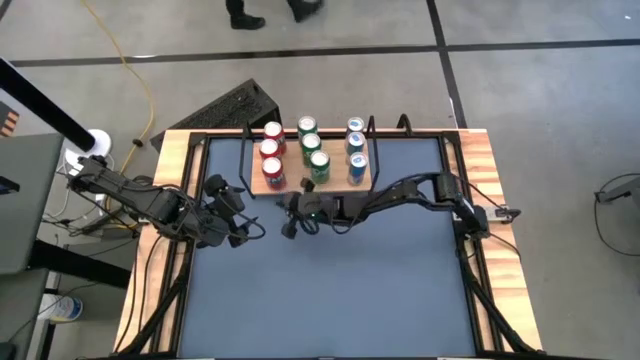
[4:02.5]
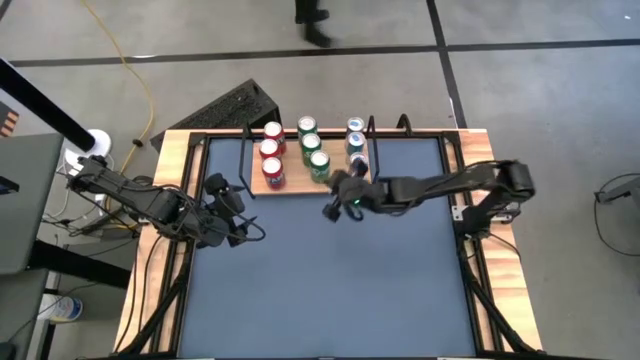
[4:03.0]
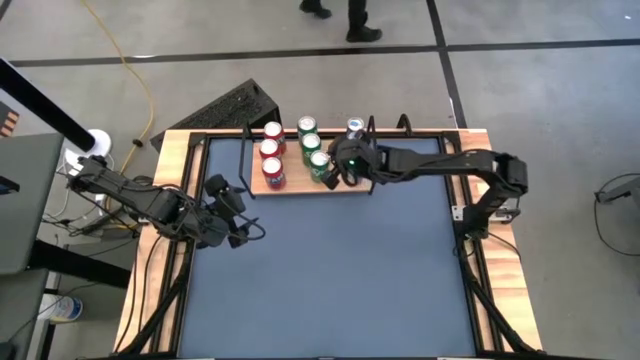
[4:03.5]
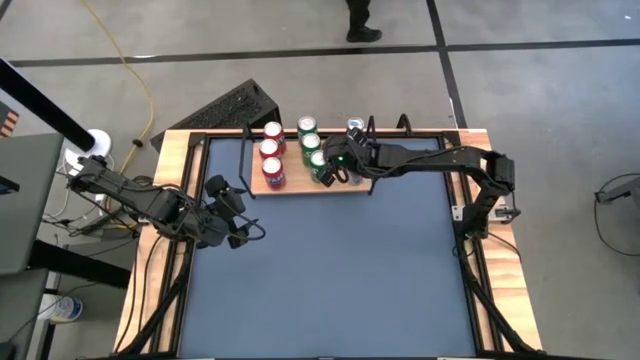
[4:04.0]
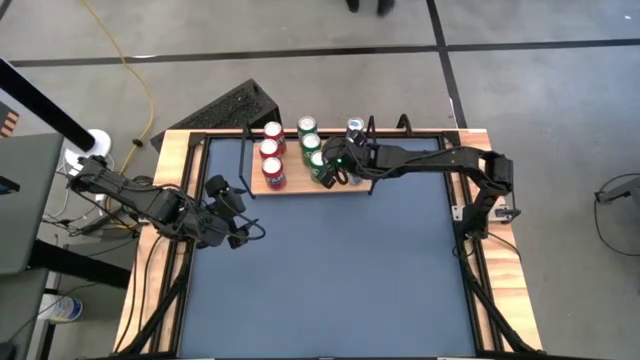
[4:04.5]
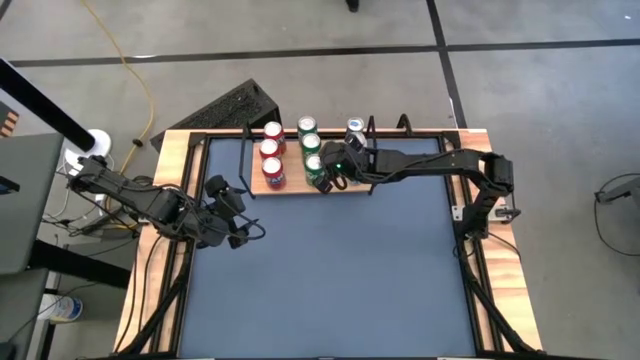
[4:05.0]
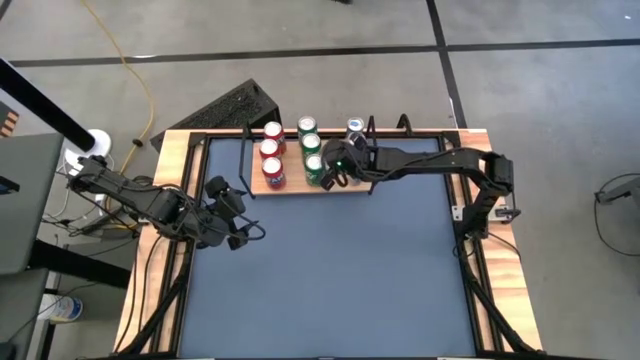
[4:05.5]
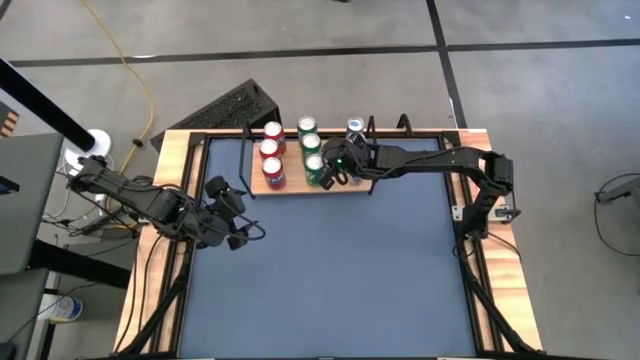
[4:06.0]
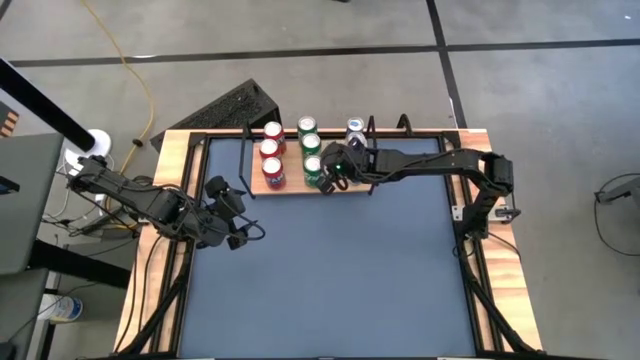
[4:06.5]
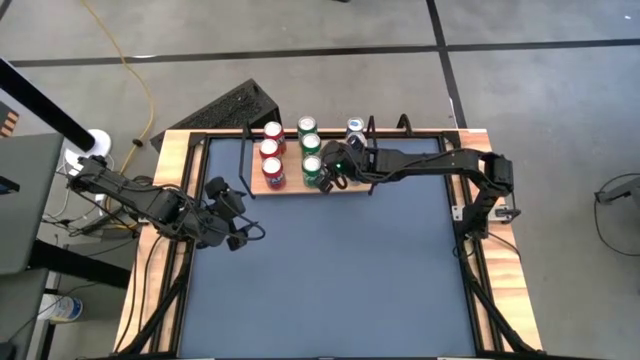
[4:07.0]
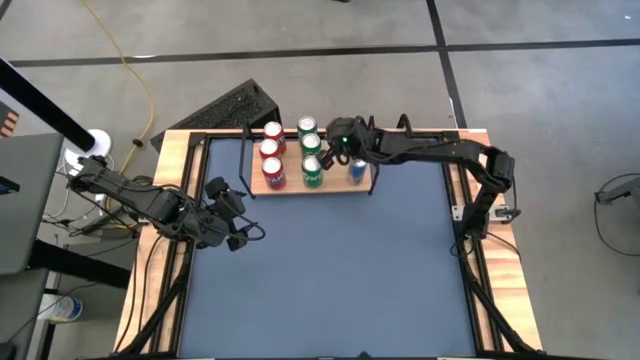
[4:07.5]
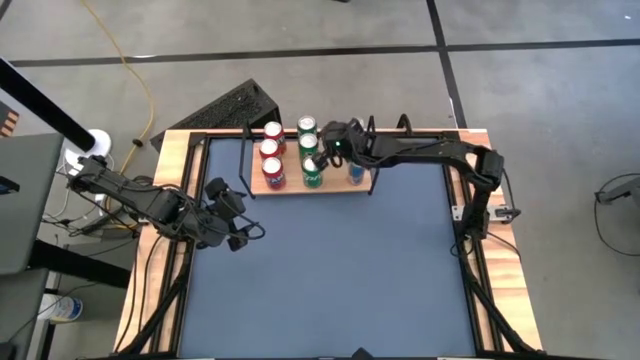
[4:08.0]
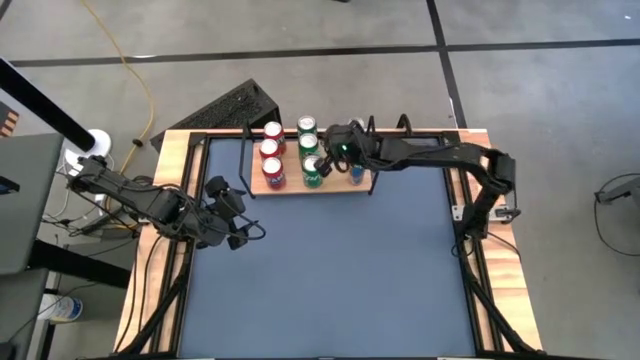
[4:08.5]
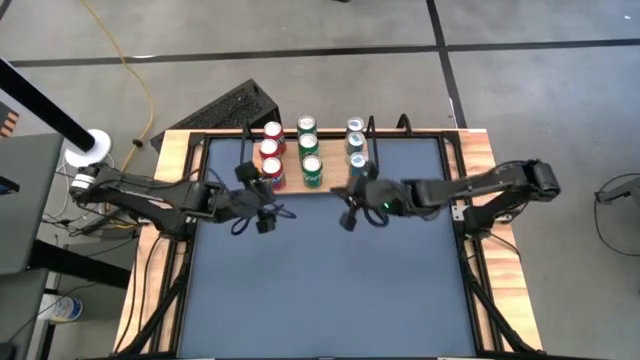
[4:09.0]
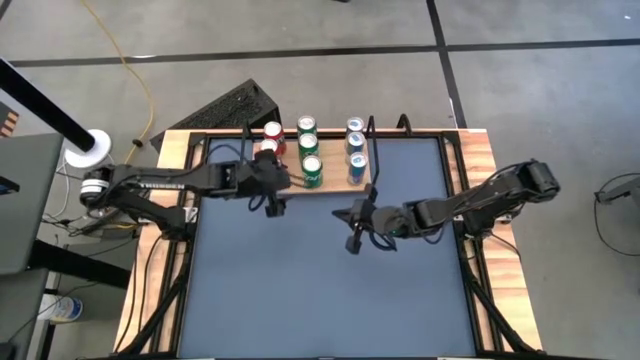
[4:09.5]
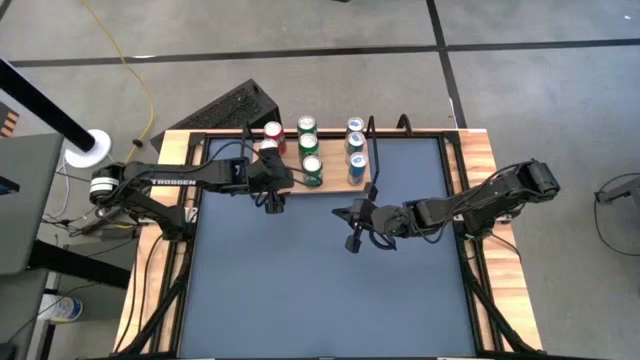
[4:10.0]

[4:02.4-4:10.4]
Task: Place canned beverage on shelf
Adjust the soda cans on the shelf

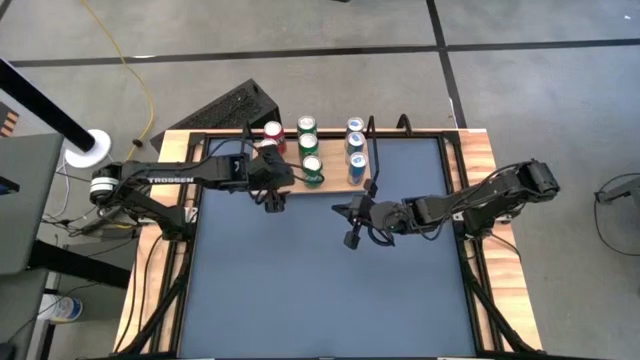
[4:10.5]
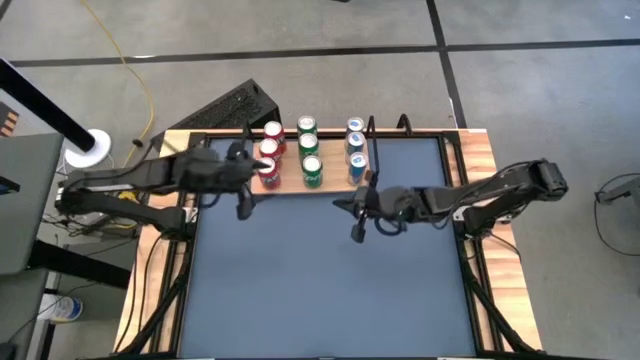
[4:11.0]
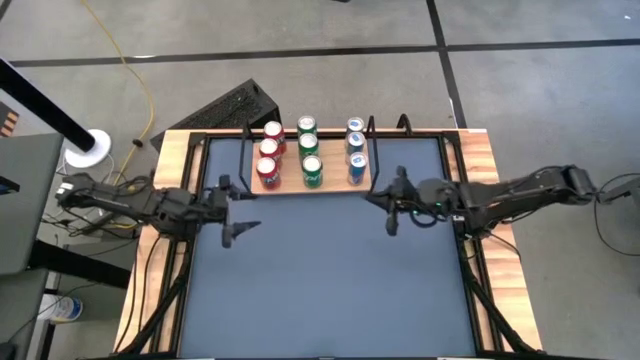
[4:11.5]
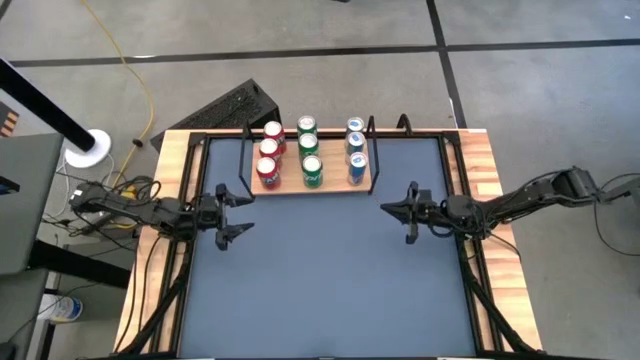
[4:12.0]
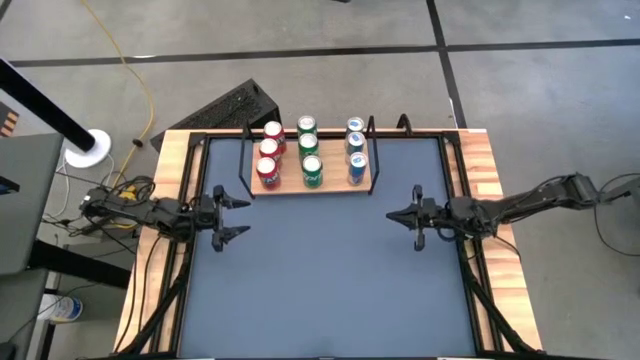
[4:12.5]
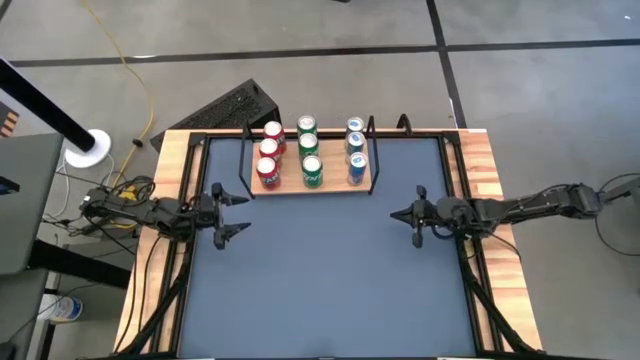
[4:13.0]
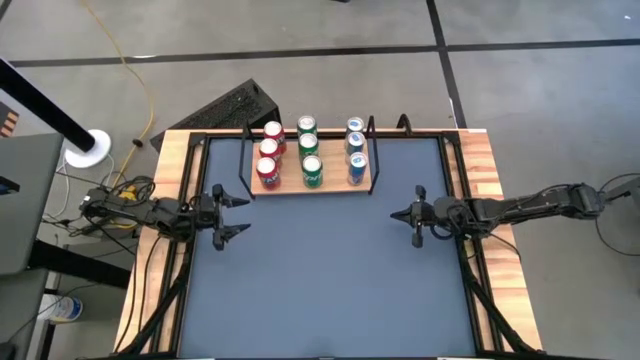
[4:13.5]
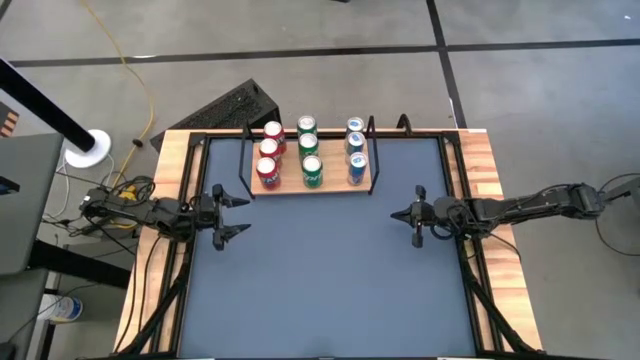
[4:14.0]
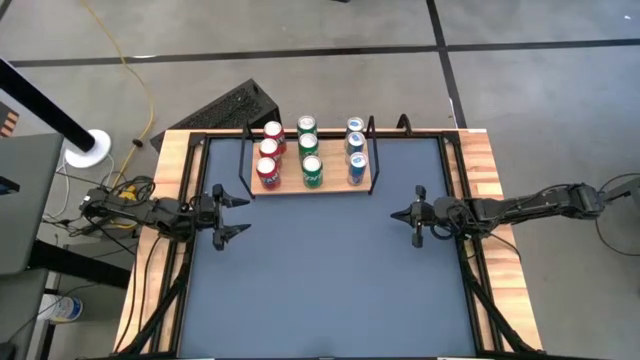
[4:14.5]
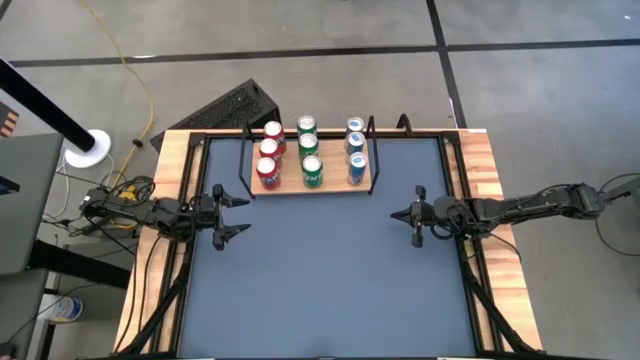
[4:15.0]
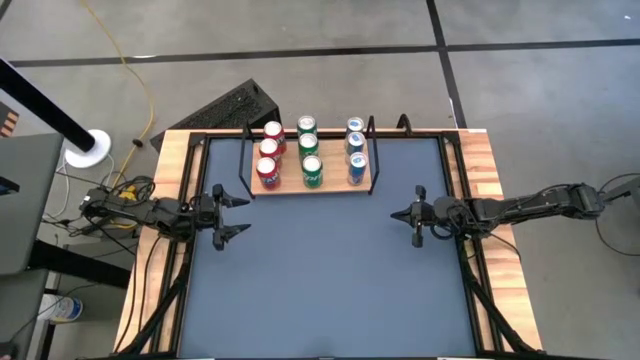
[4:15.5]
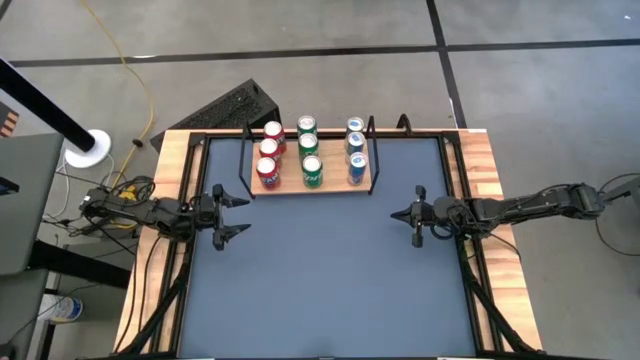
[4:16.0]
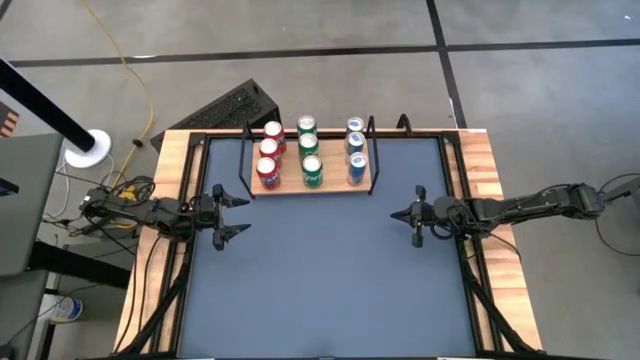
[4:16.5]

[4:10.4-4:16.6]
Return to Home Position

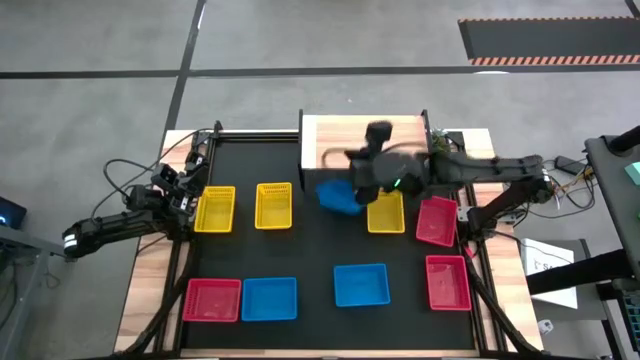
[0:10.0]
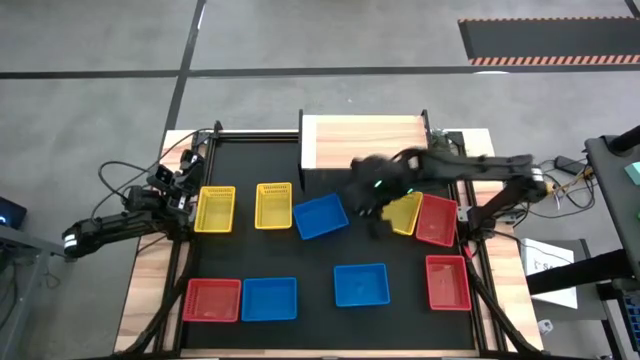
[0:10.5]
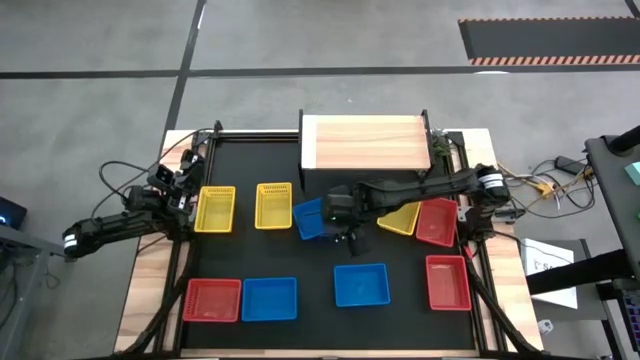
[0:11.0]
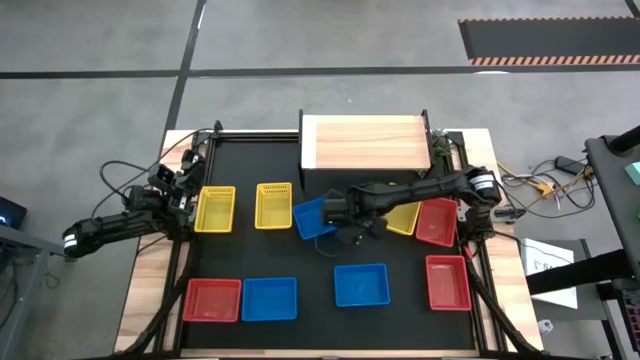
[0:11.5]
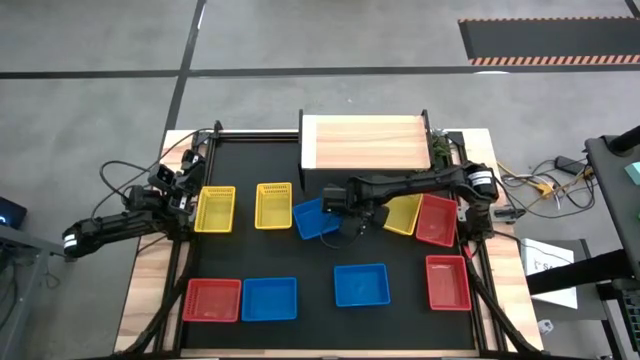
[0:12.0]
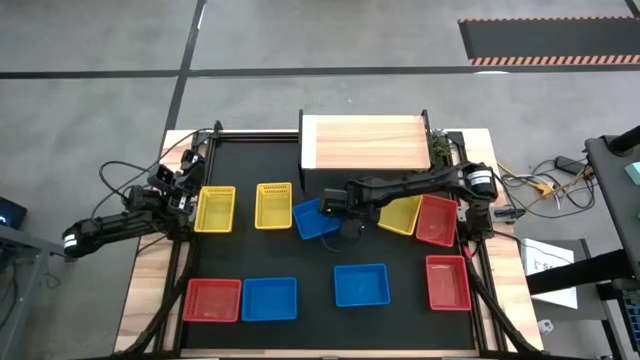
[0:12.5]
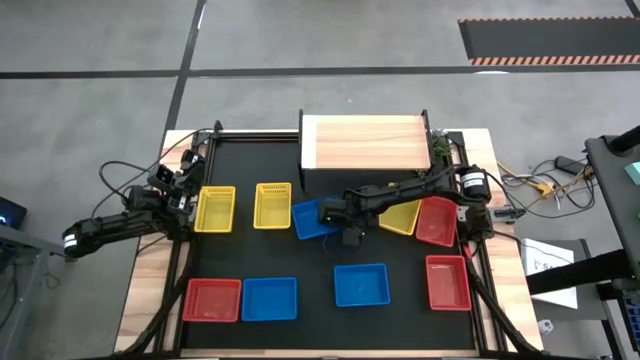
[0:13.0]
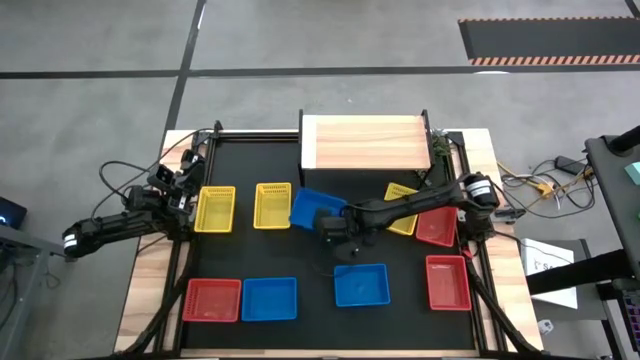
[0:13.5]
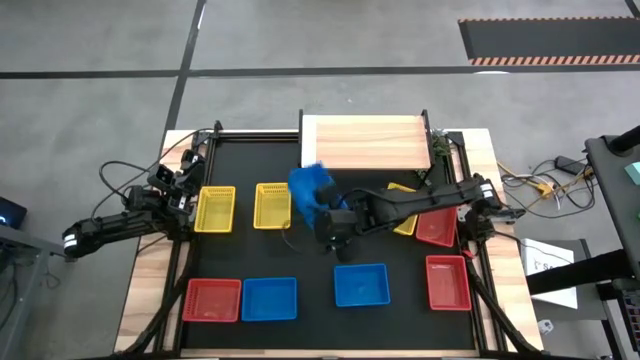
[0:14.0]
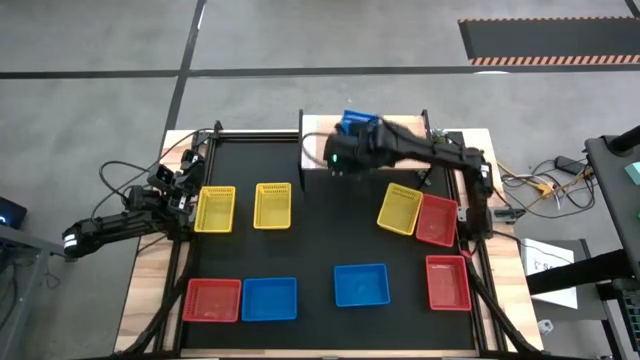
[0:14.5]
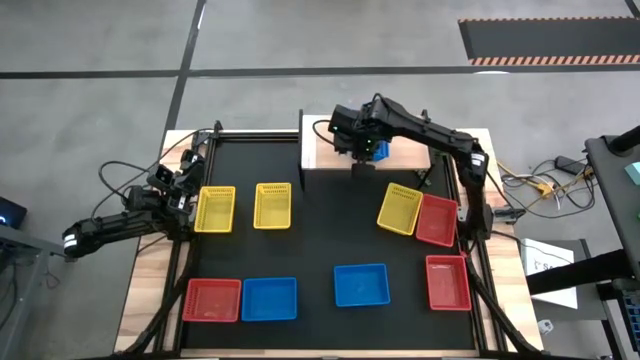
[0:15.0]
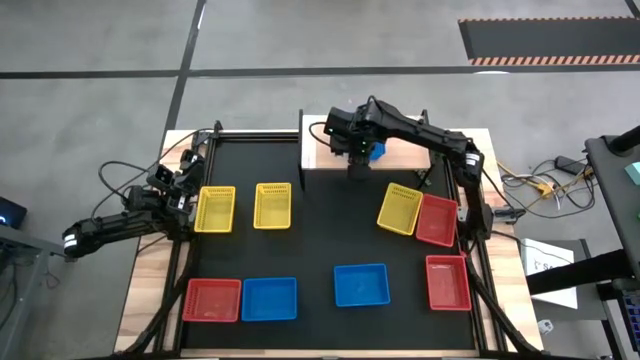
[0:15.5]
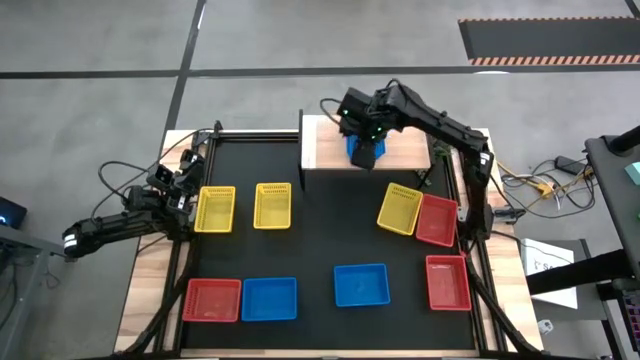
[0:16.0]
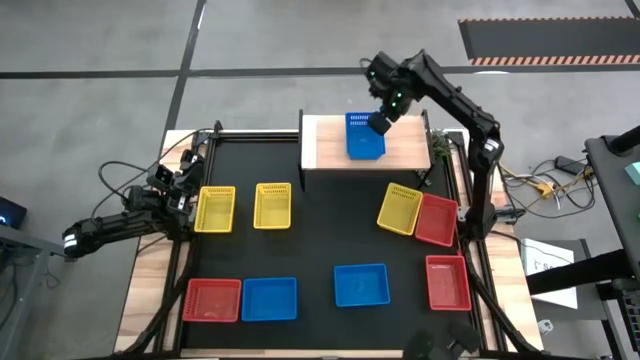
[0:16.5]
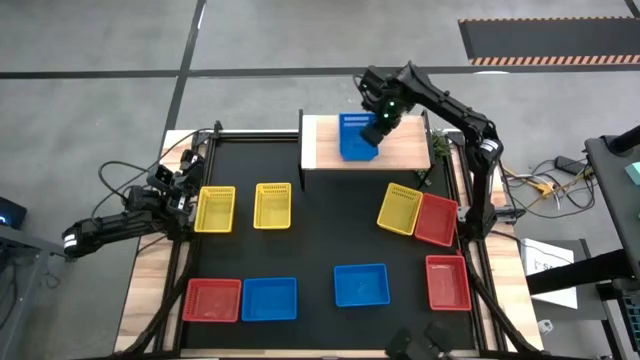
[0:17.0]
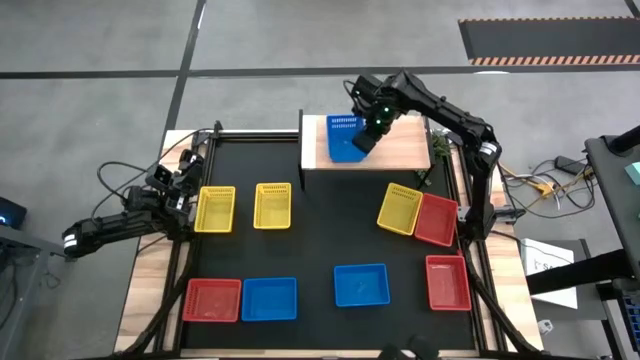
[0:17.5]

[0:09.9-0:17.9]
Task: Stack baskets on shelf by color
Put the top blue bin on the shelf
